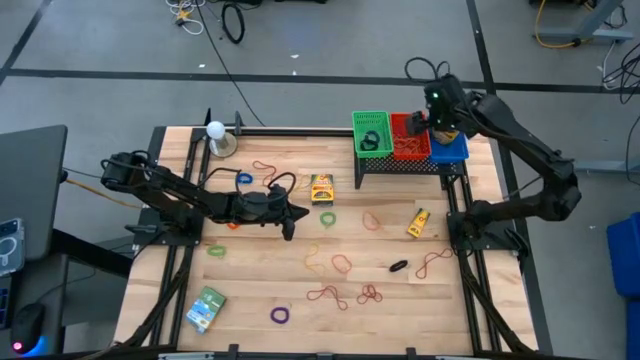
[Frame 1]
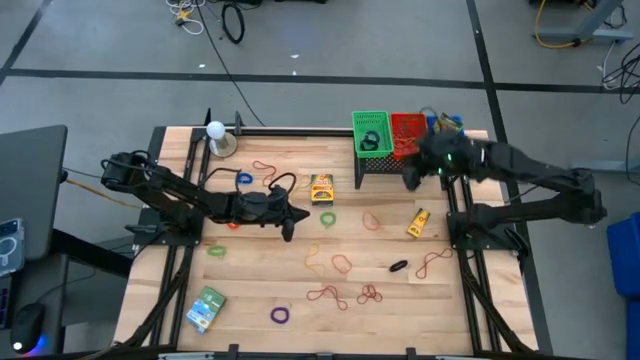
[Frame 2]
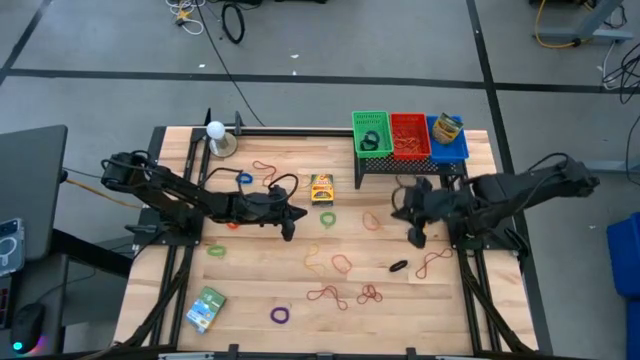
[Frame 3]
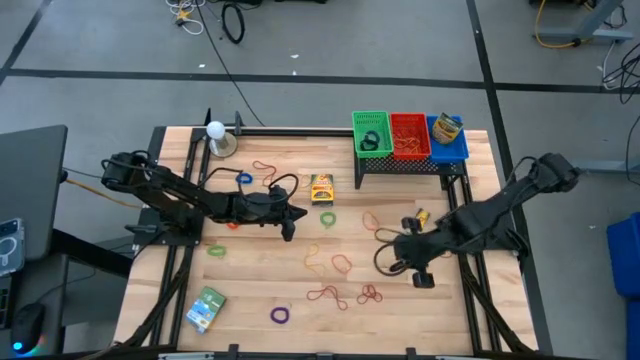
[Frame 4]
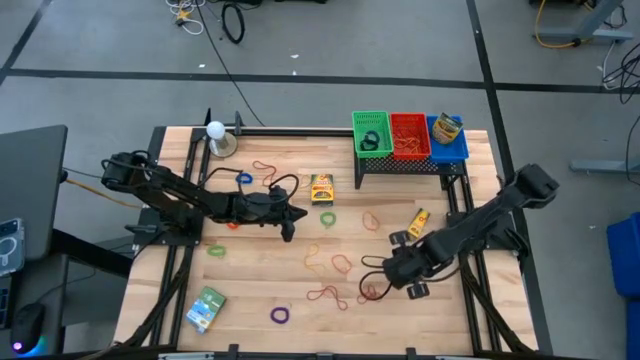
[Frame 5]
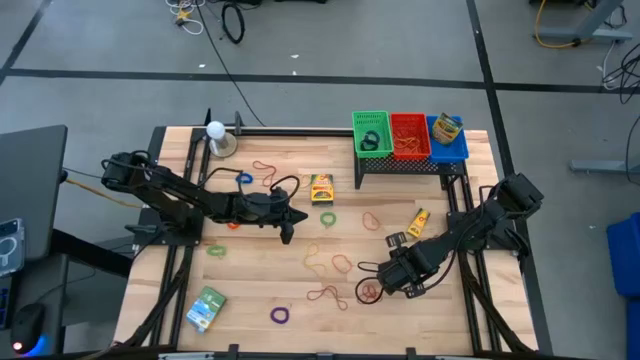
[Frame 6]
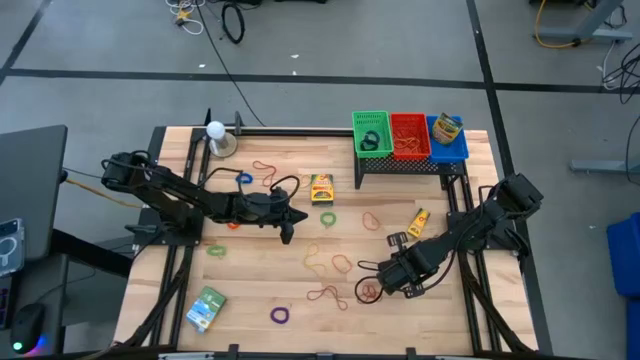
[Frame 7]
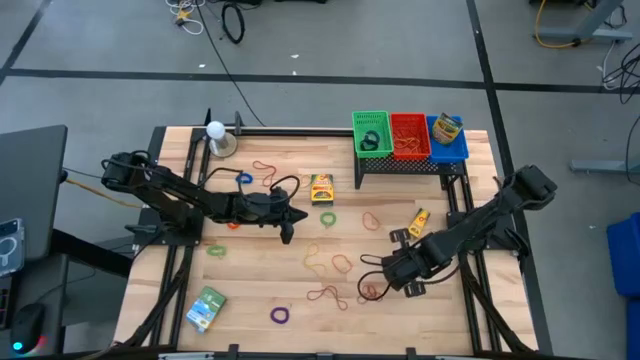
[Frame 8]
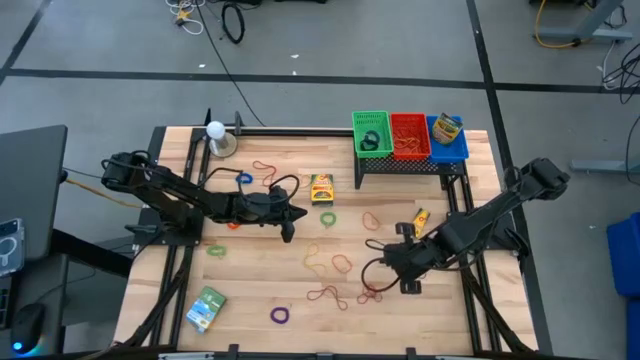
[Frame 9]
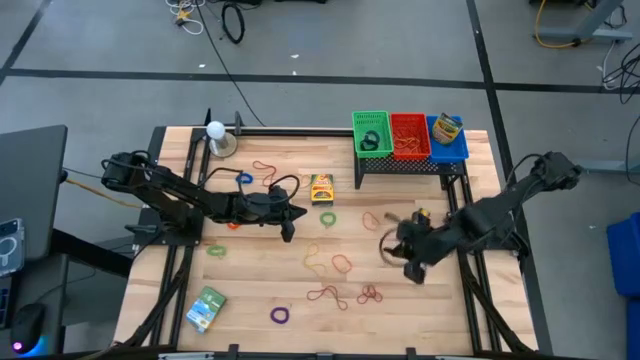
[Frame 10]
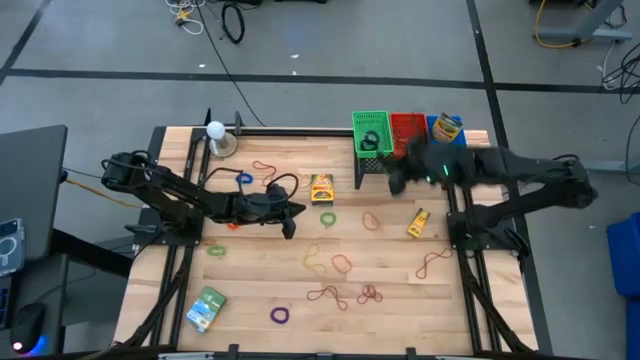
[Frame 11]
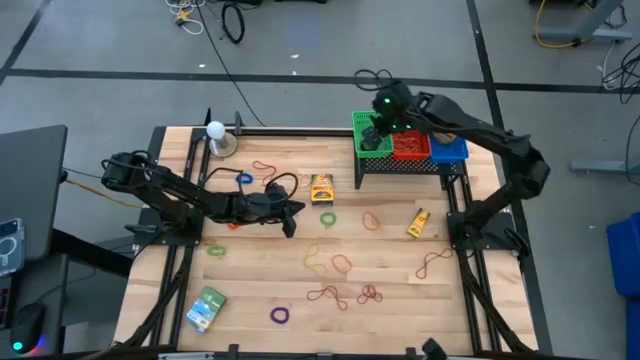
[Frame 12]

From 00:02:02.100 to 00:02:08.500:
Task: Pick & Place Office Desk Supplies
Put the black spring keychain into the green bin

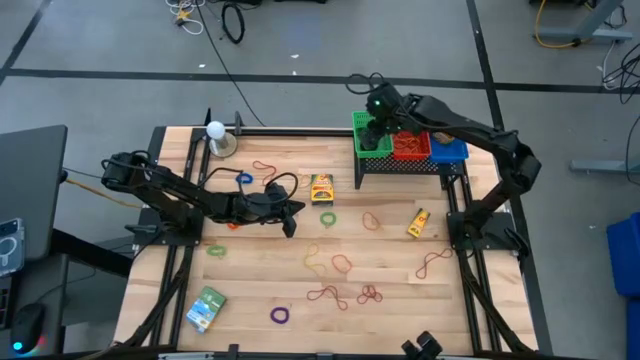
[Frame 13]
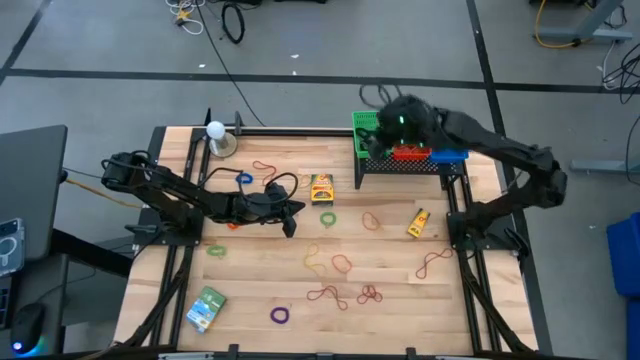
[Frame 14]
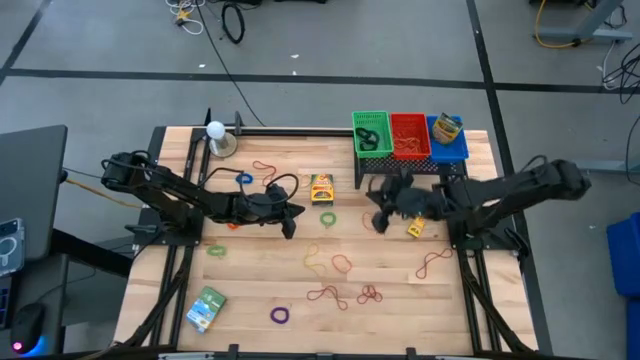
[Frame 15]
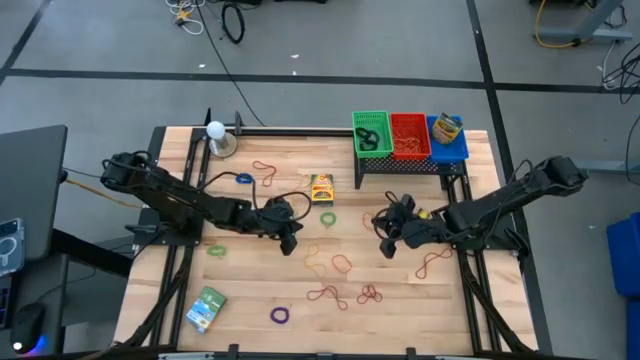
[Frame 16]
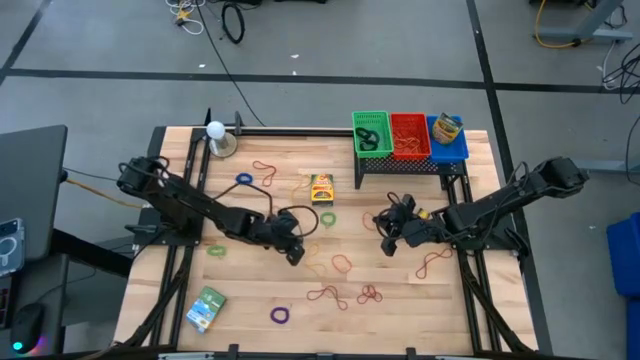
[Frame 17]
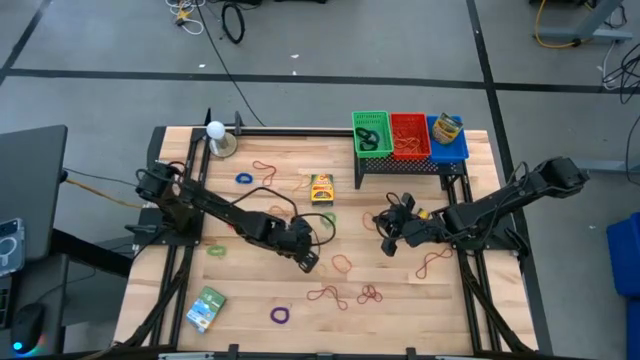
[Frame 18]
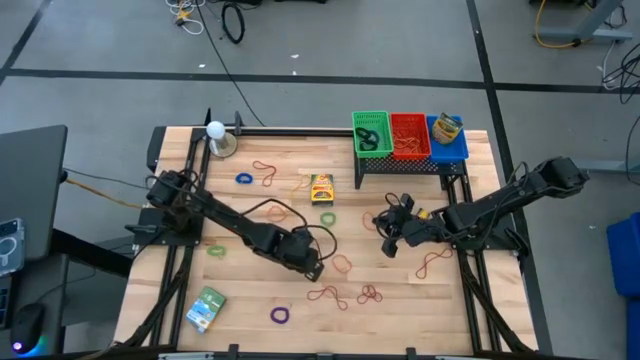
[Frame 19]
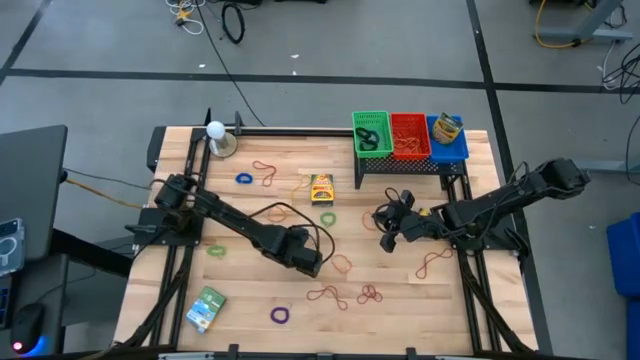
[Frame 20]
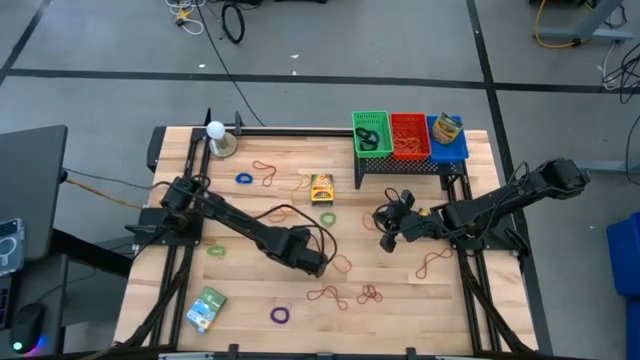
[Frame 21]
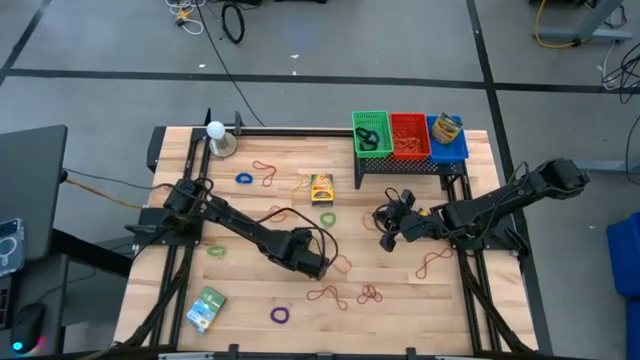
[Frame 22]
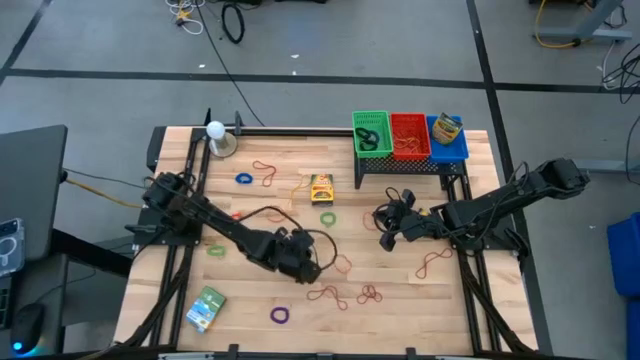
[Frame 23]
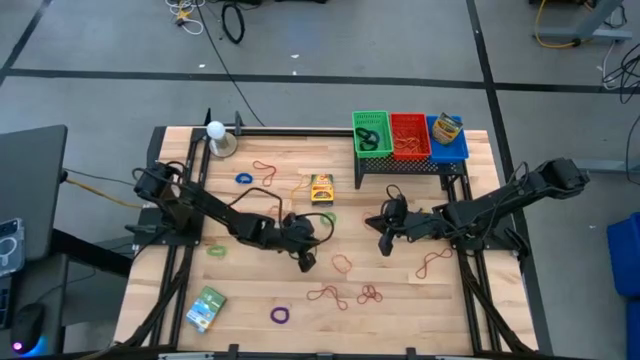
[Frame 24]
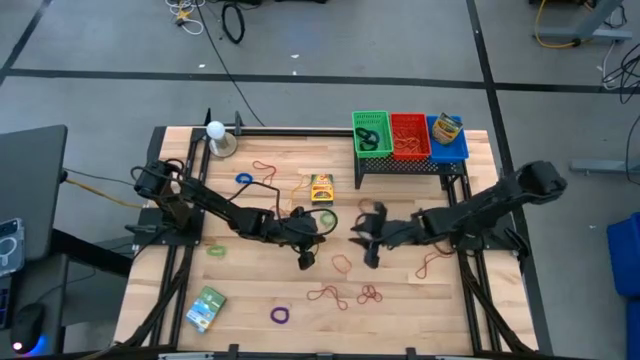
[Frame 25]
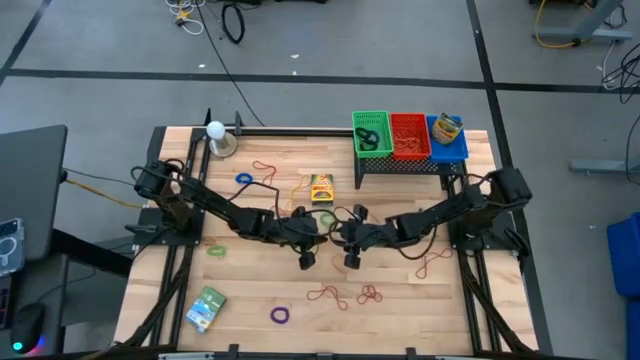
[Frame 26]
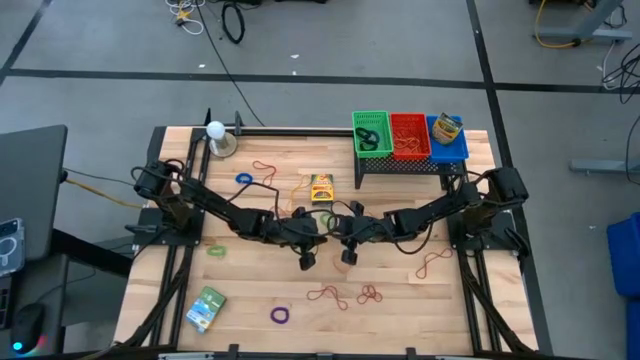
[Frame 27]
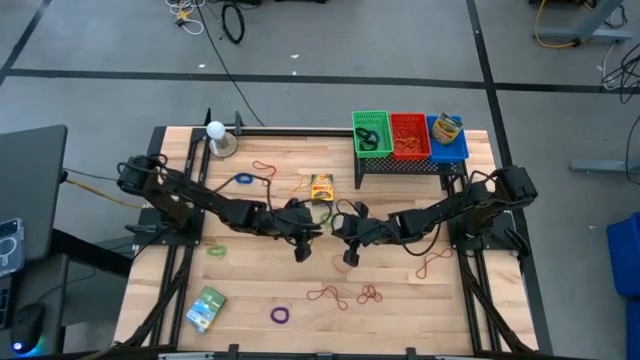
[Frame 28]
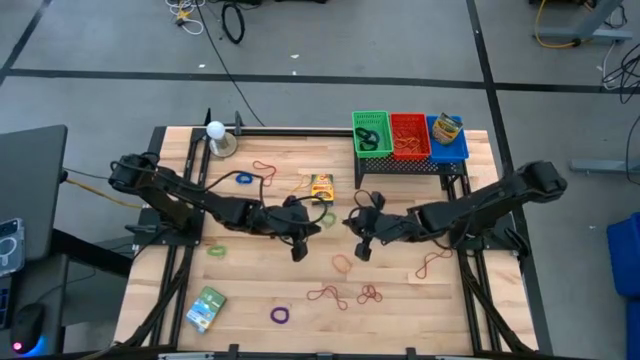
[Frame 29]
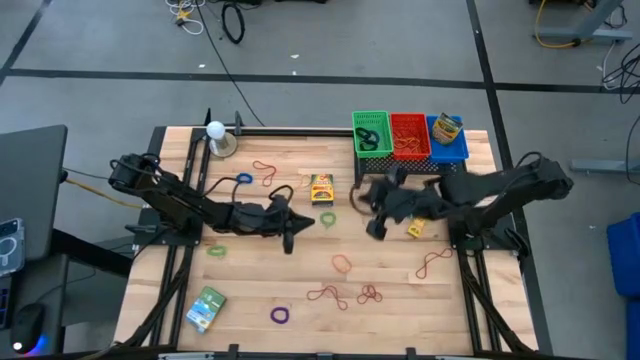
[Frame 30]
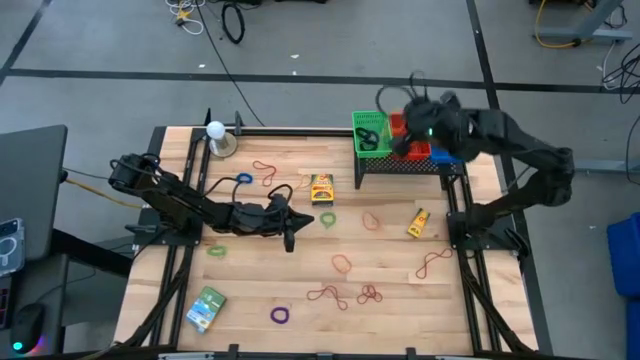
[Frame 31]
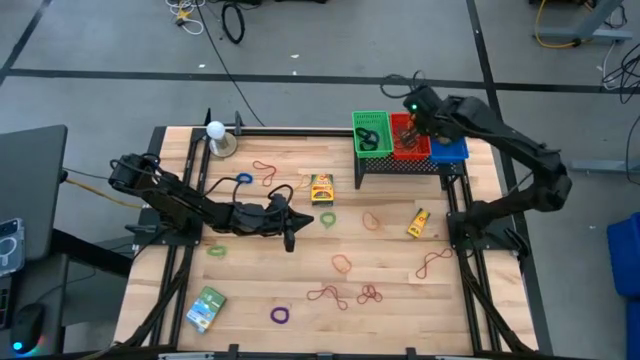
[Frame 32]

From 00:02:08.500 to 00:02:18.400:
Put the yellow rubber band into the red bin

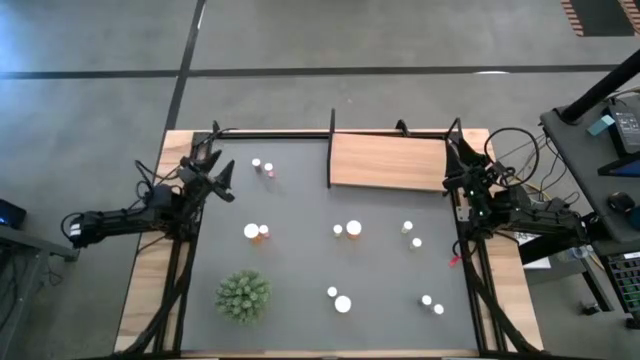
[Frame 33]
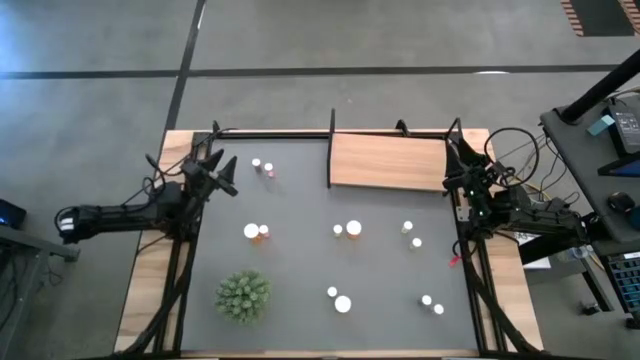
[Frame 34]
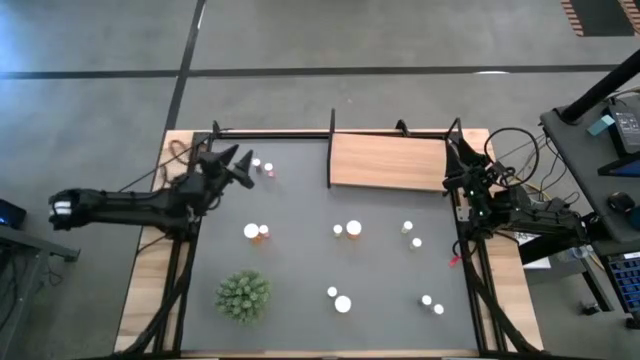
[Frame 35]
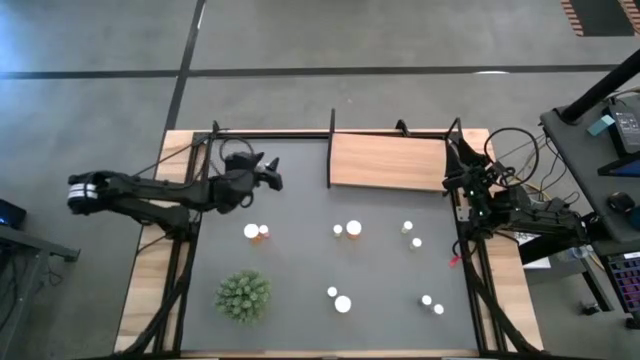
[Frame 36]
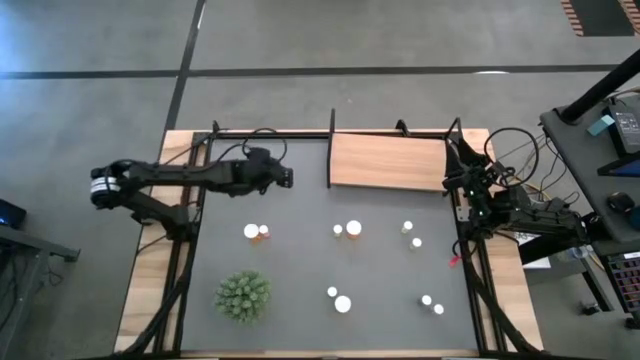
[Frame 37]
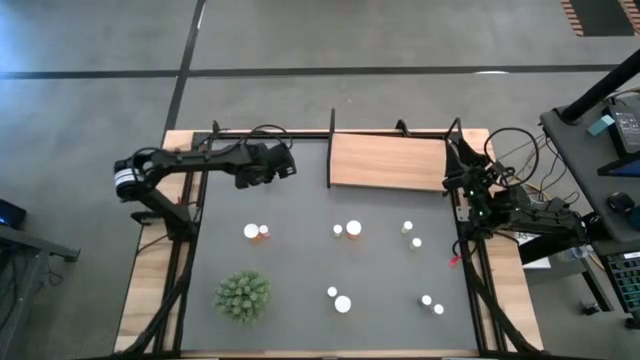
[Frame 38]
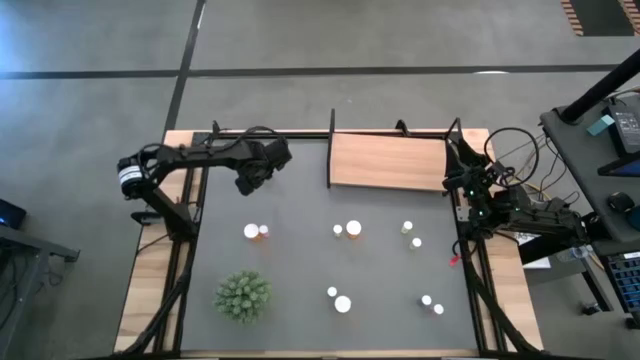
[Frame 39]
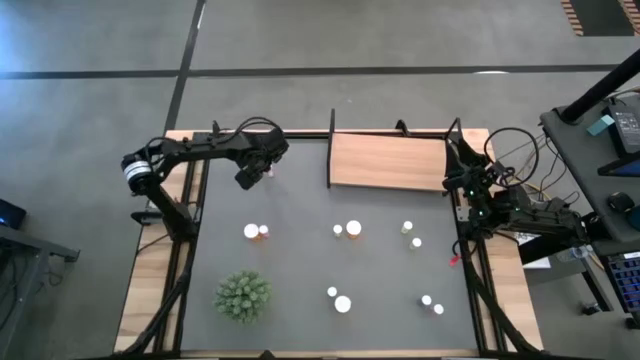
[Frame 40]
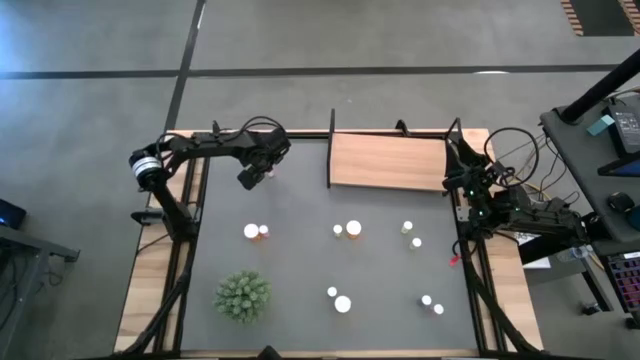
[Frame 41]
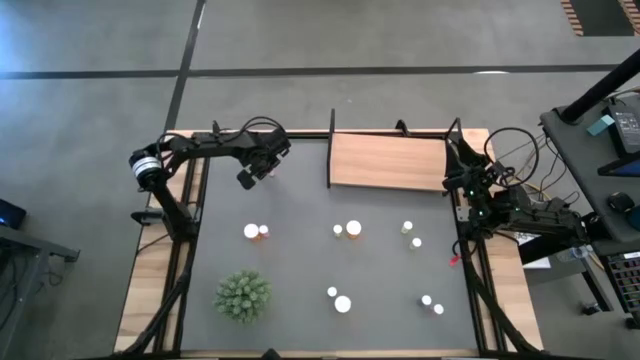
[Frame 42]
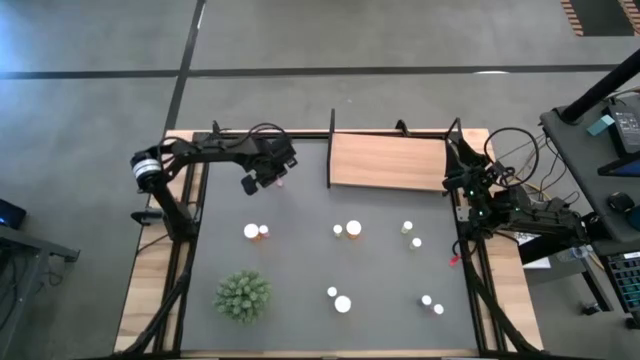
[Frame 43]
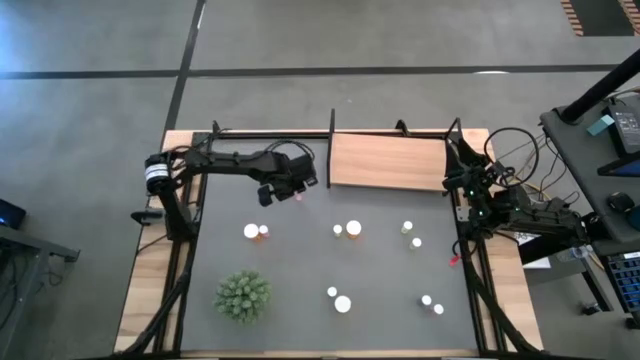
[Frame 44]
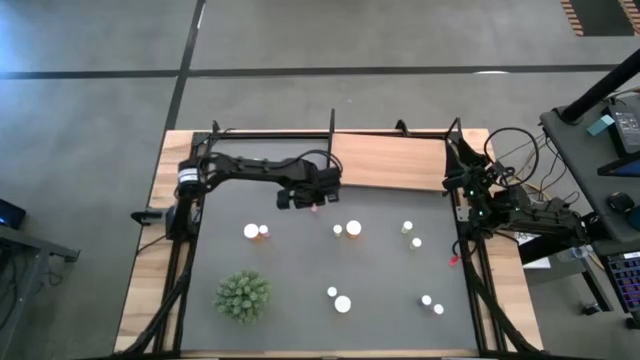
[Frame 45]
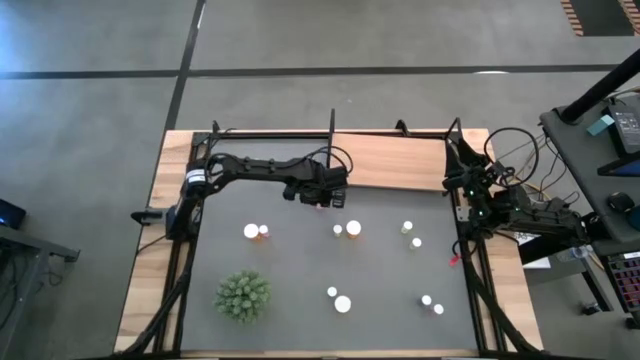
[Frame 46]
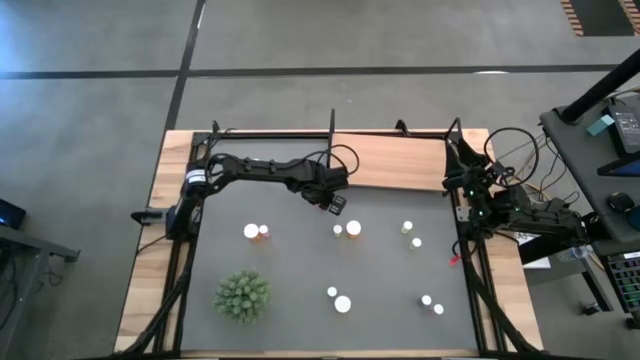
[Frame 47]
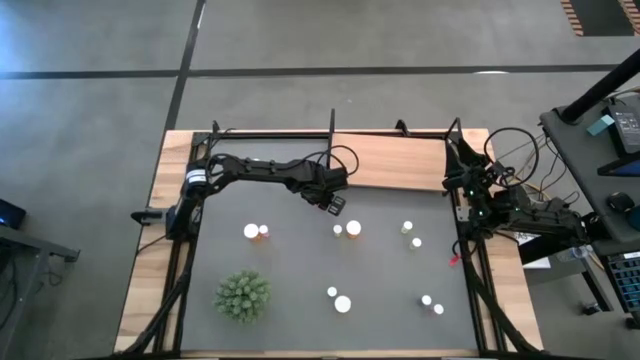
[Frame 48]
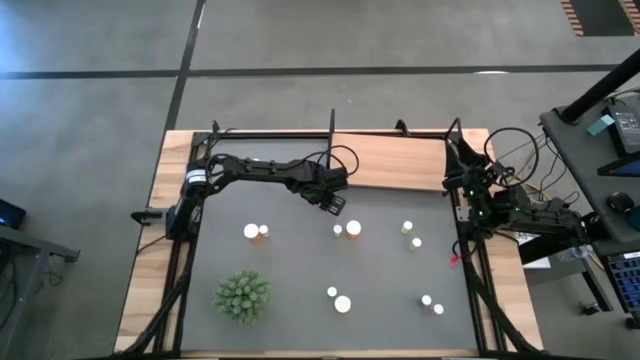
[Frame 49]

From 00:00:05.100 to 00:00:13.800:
Task: Pick and place medicine bottles onto shelf by color
Move the top pink pill bottle to the center of the table
